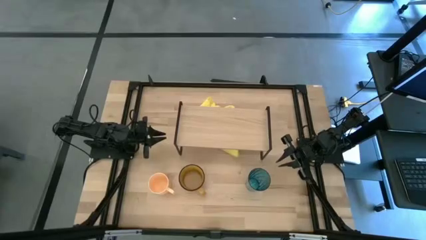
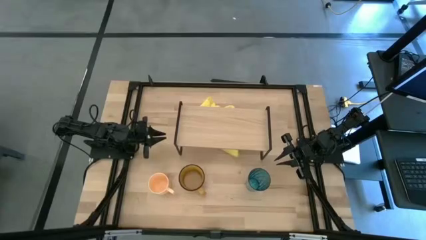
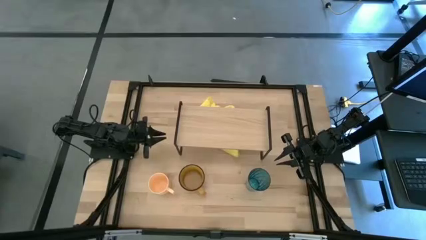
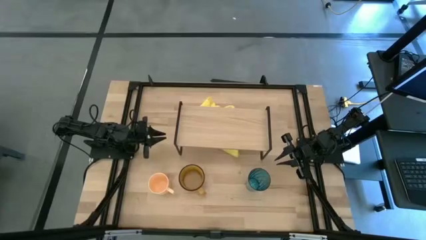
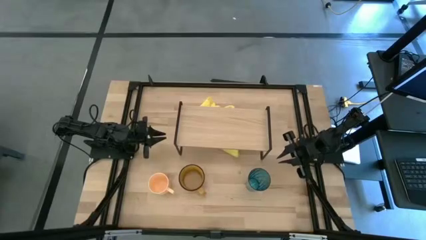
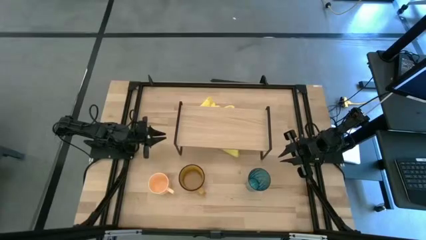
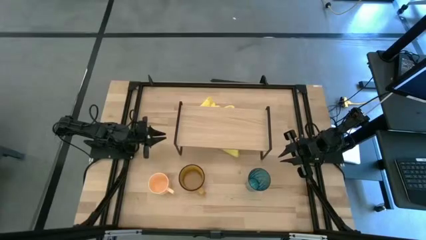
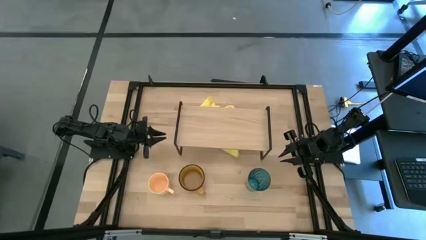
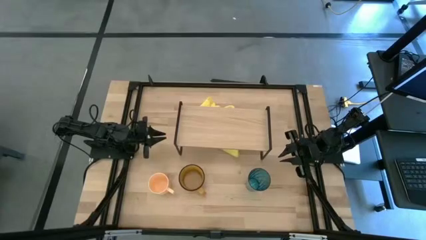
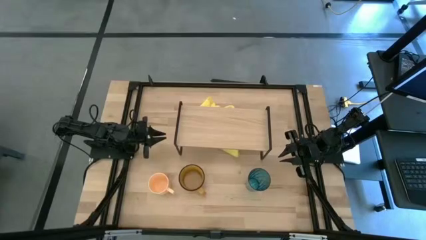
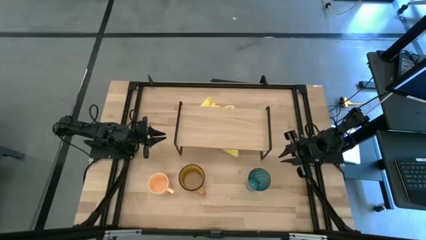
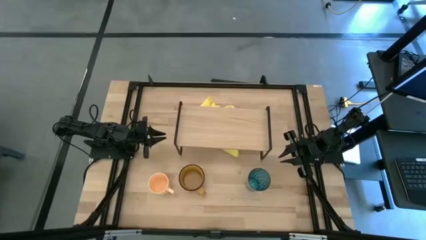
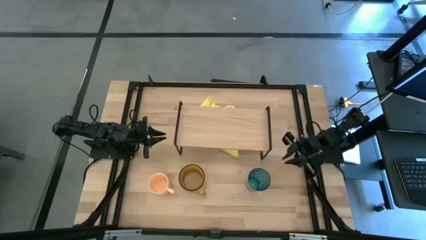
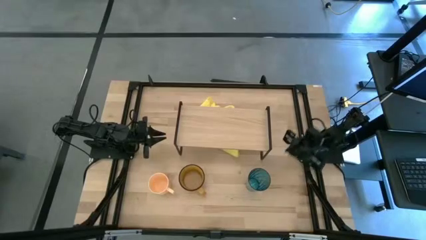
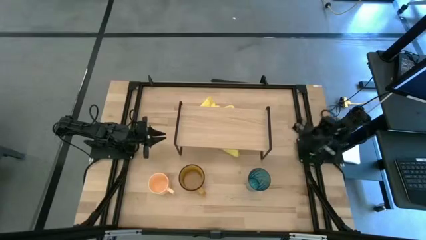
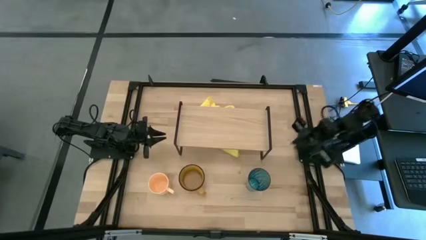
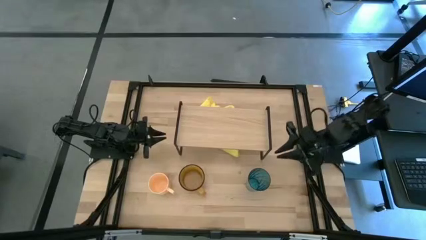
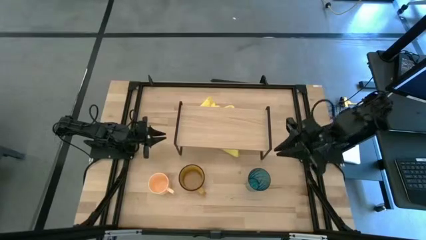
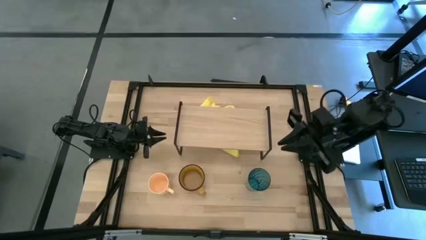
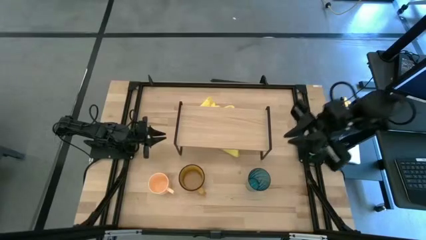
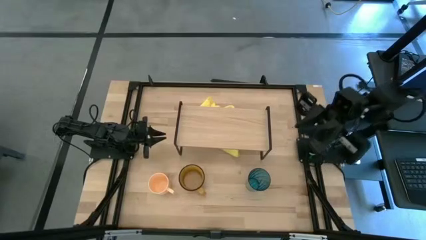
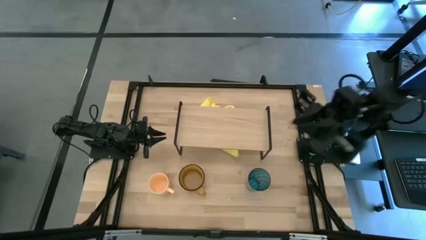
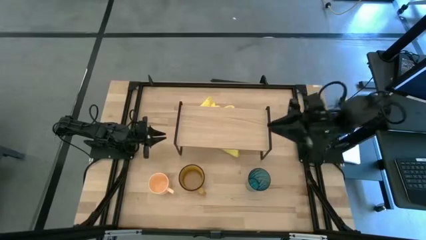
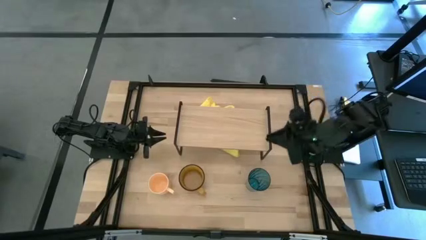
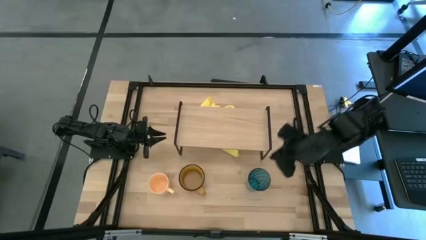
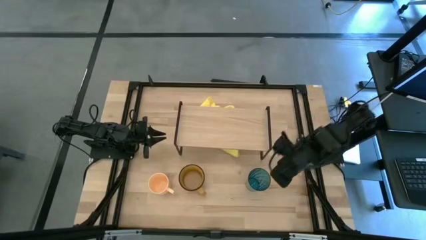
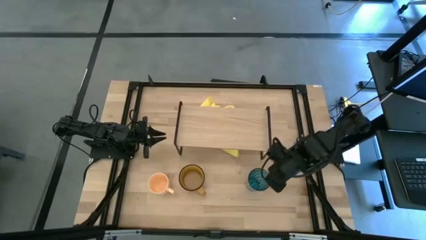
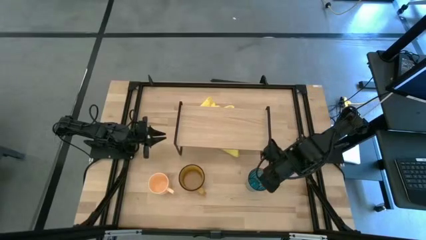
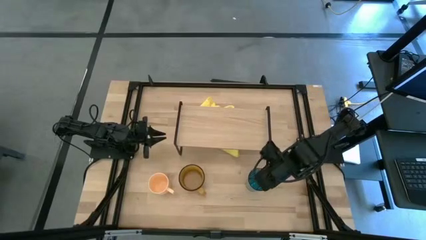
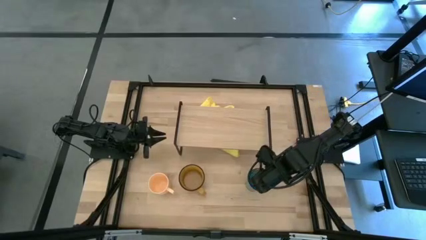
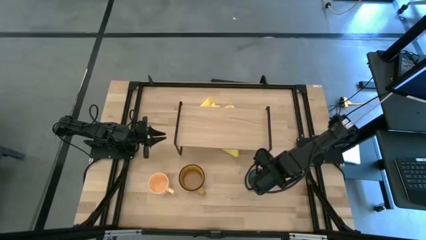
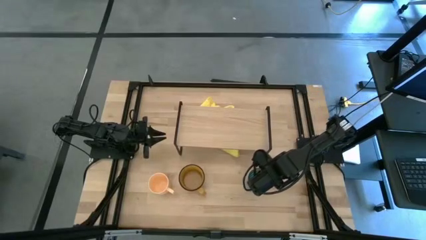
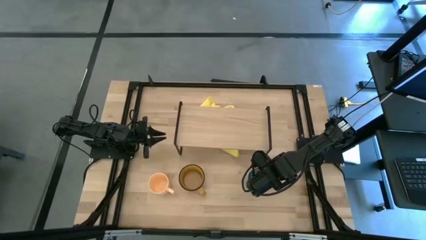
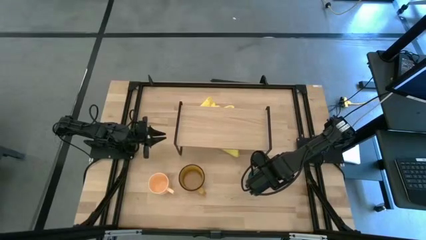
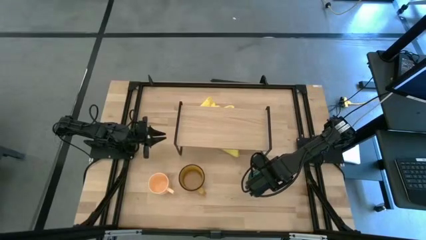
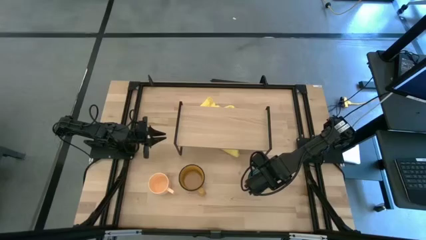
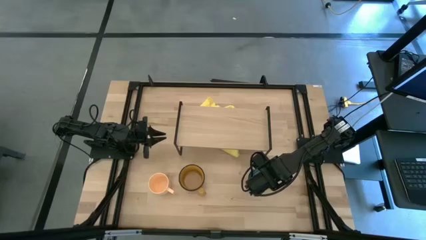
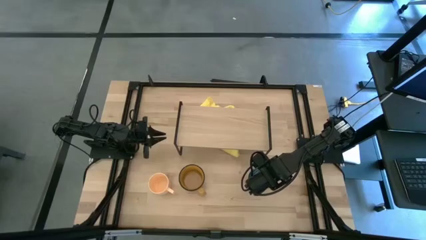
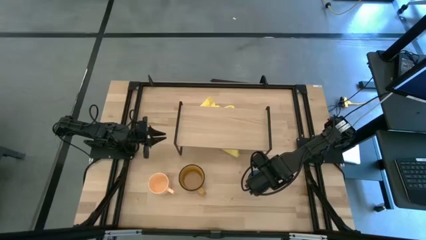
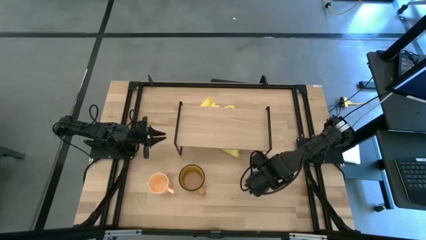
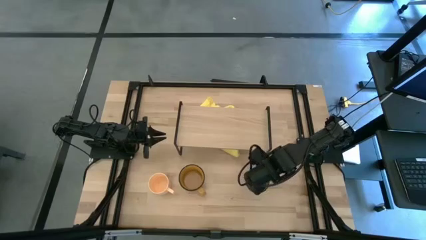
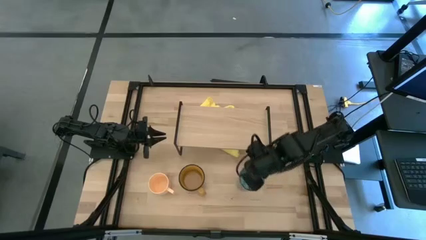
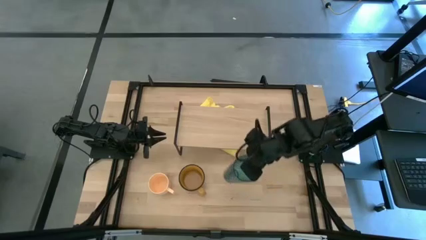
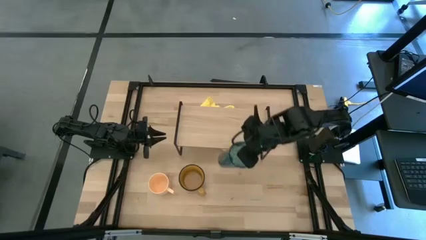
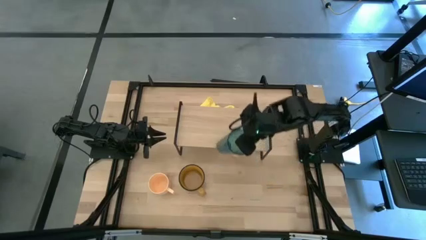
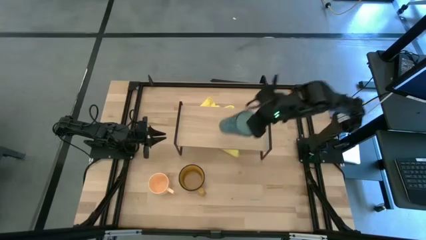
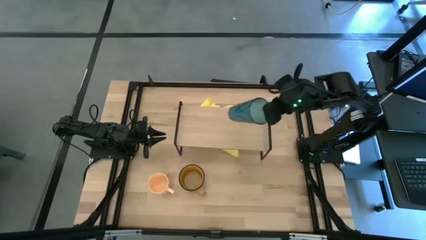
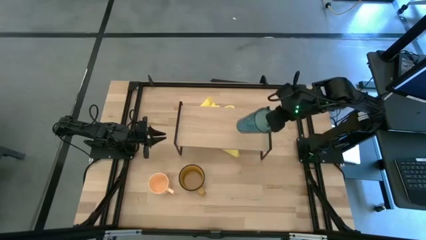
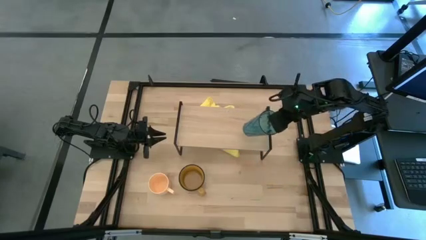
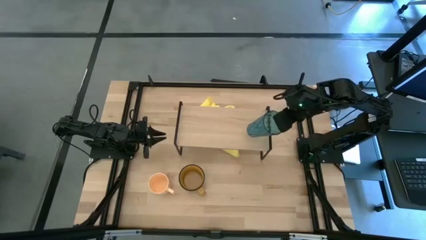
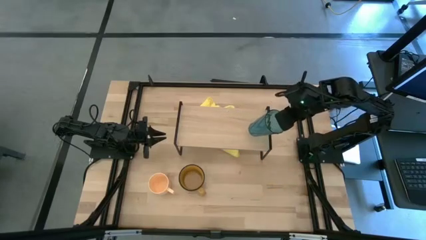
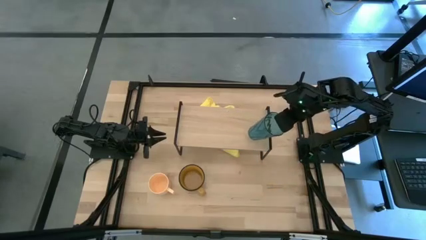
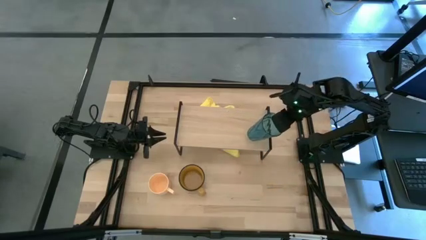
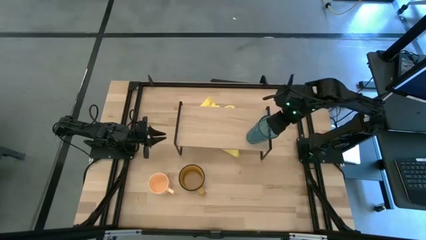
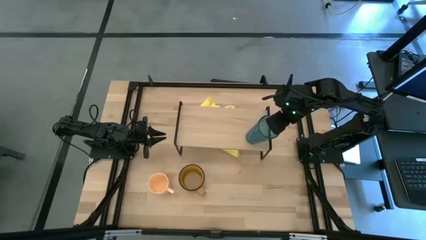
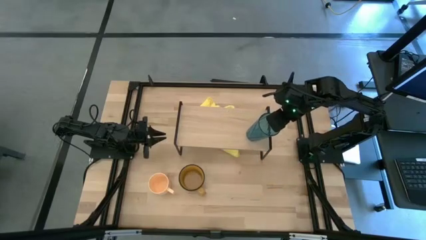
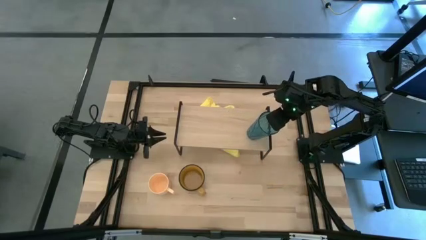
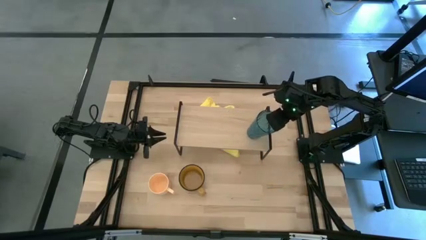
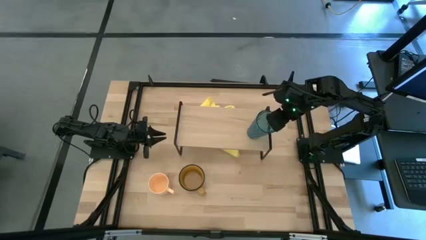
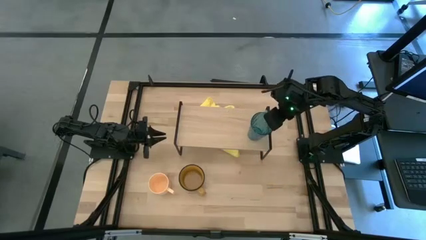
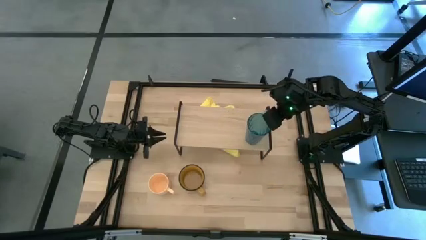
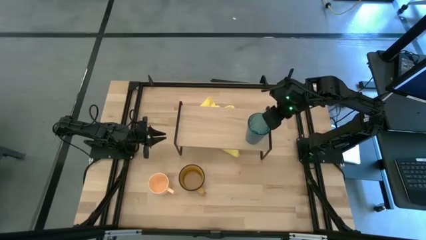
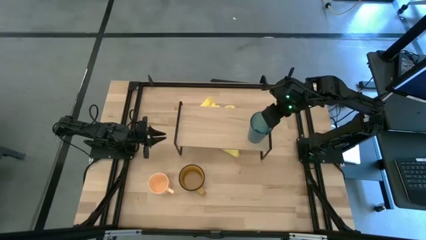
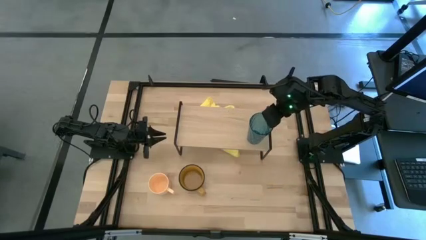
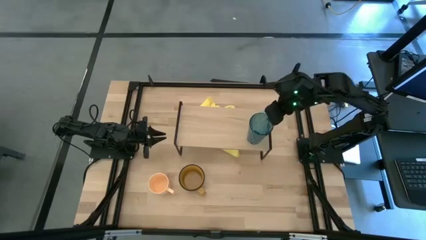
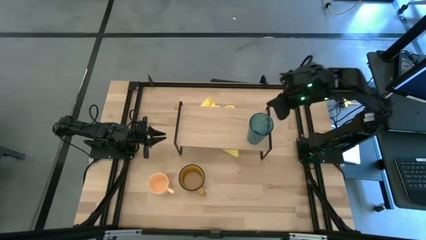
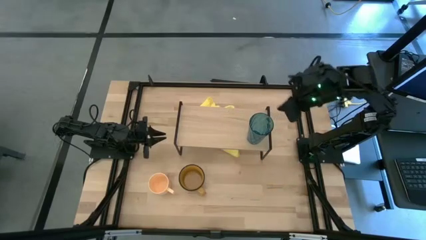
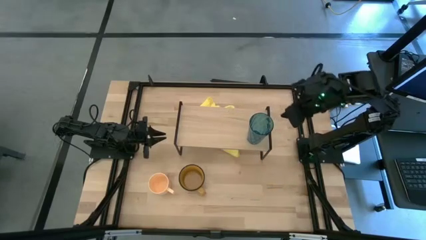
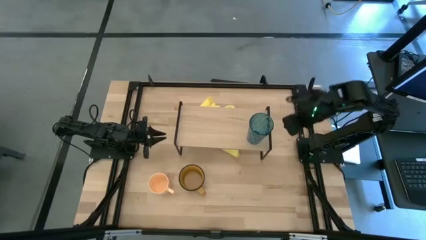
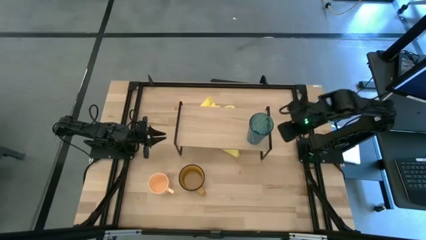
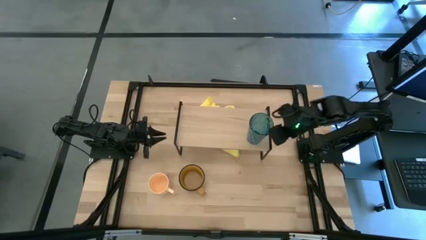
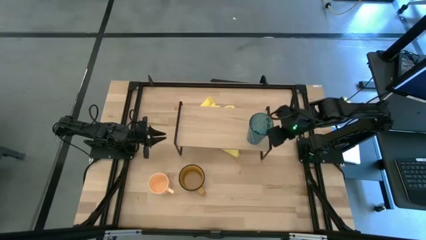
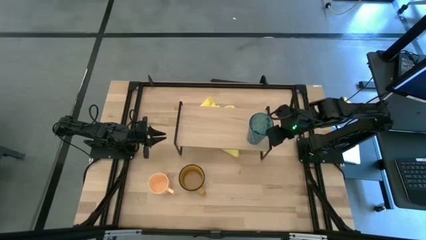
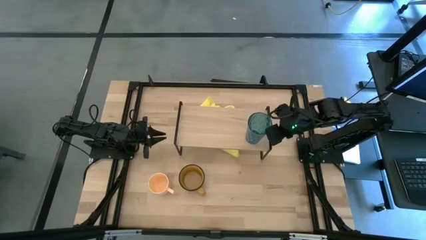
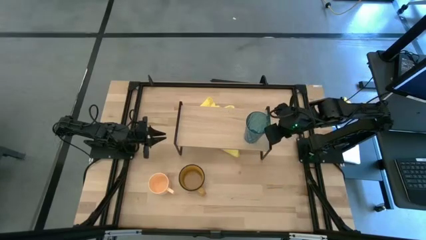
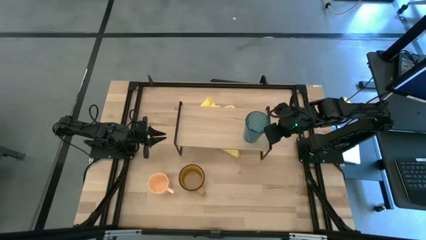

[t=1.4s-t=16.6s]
Task: Stack small to large cups/mugs on shelf
Put the blue cup on the shelf
